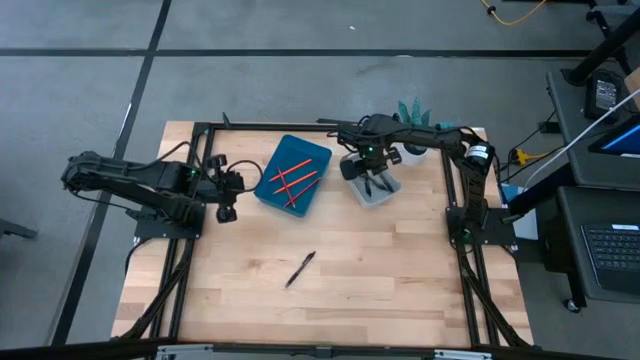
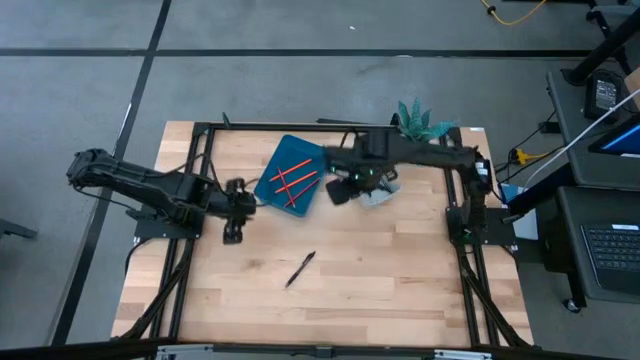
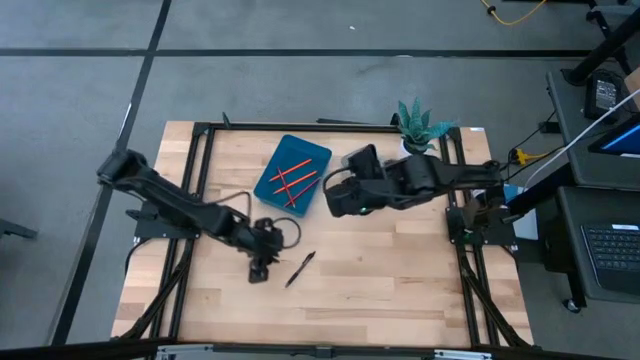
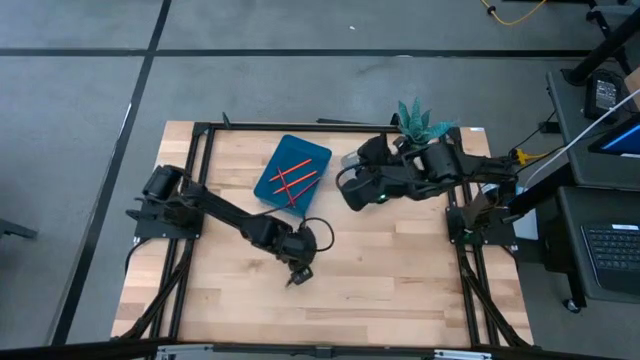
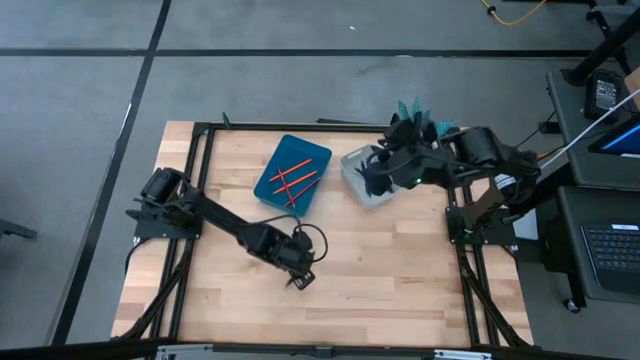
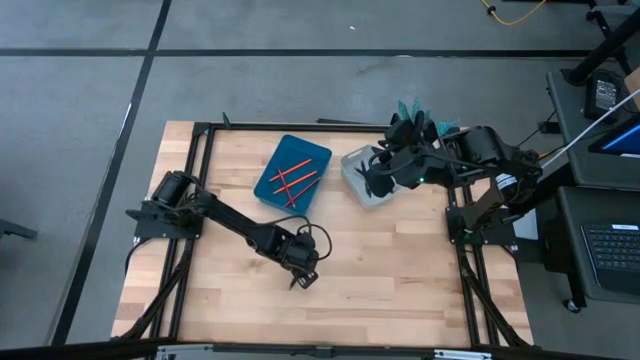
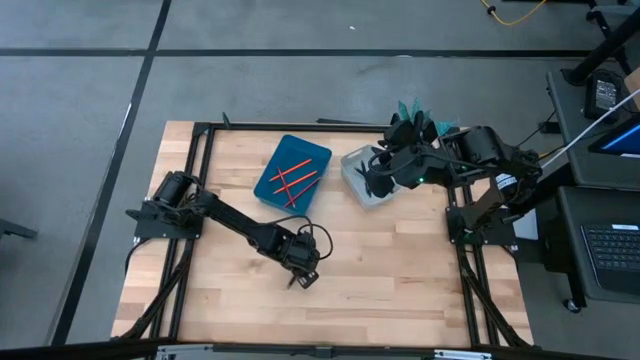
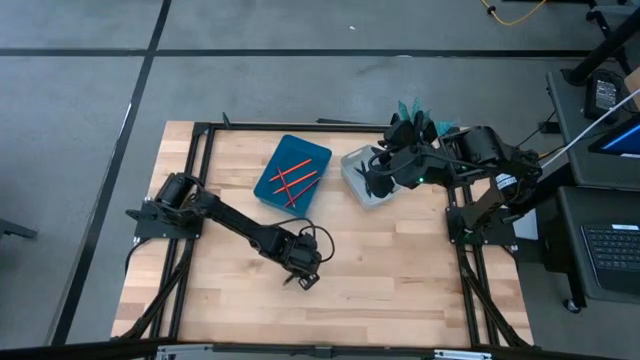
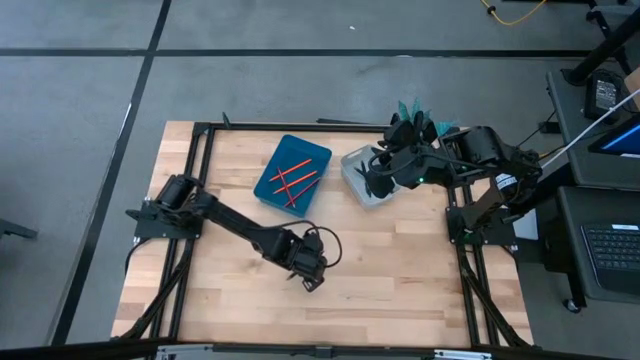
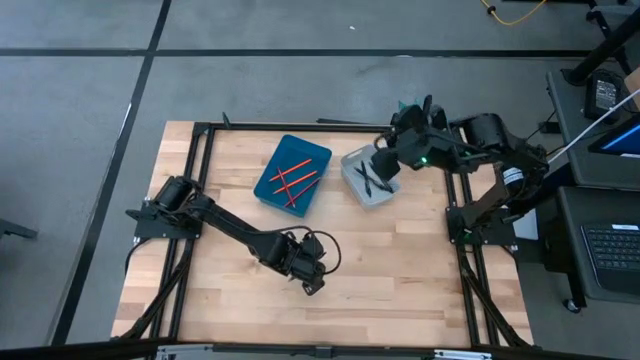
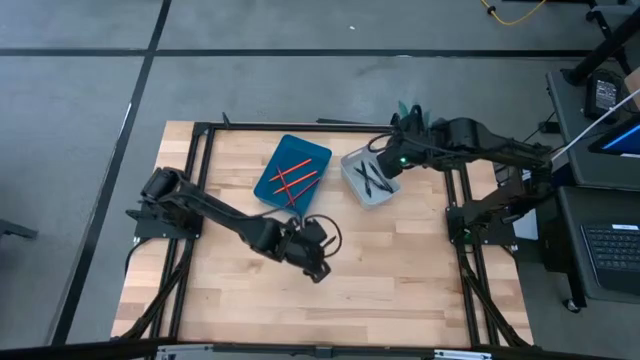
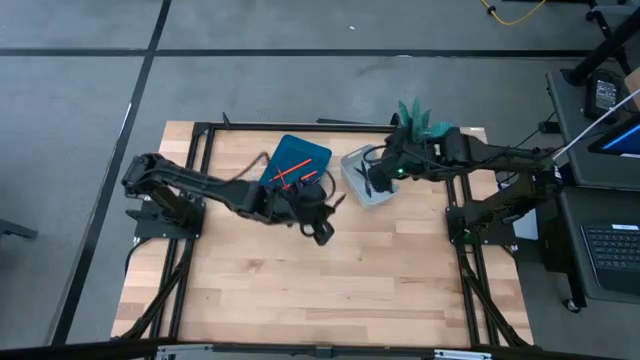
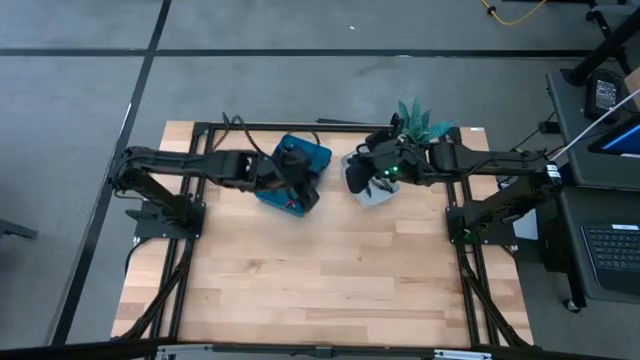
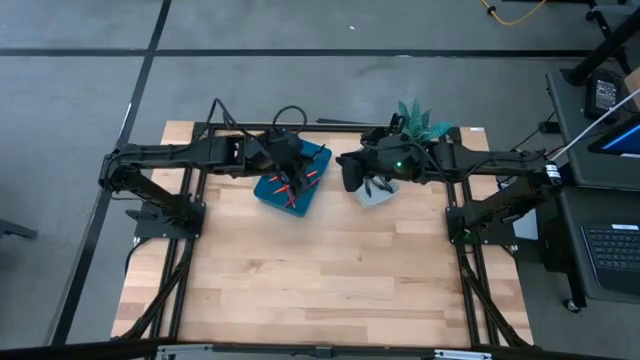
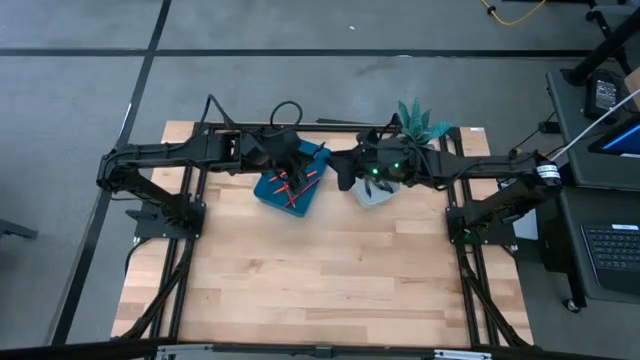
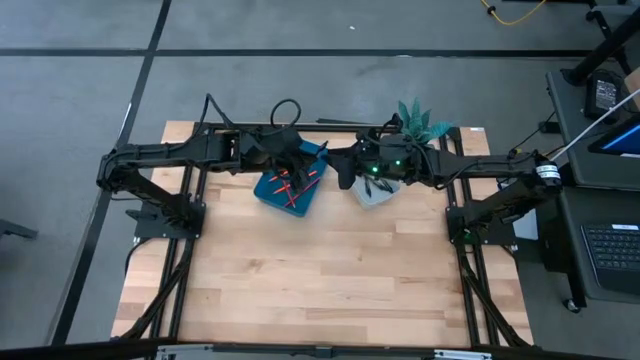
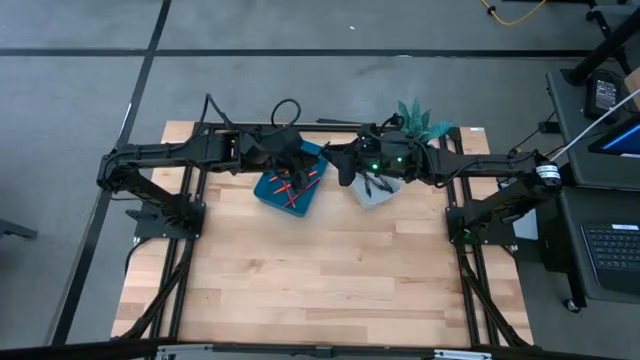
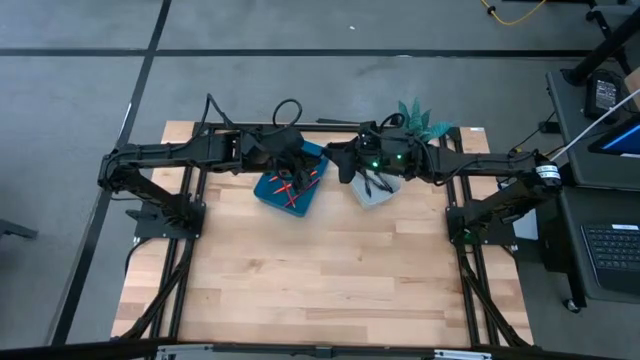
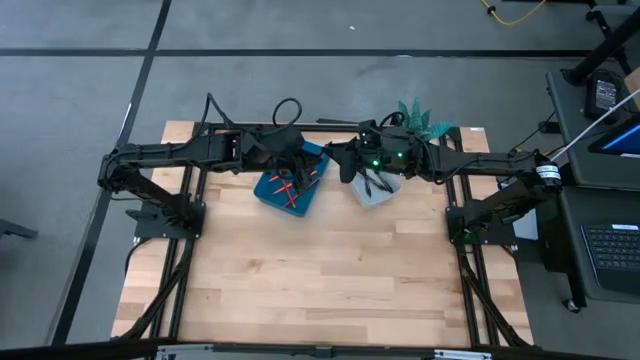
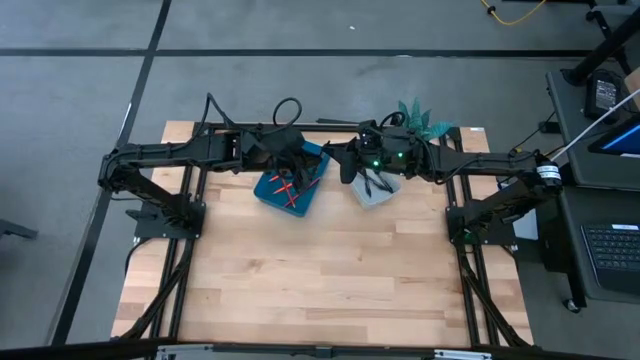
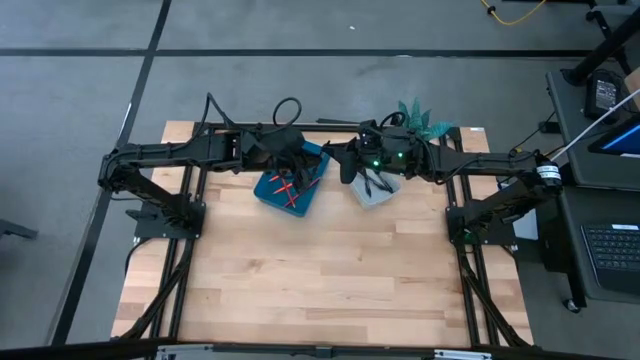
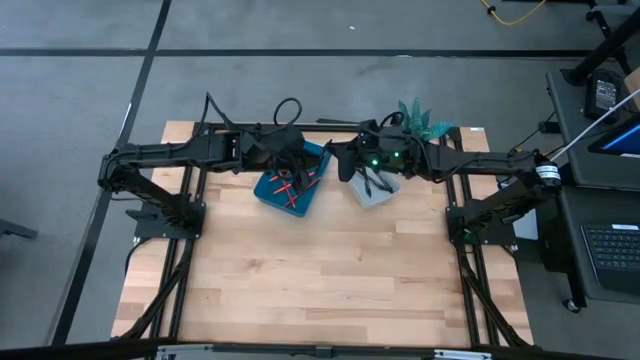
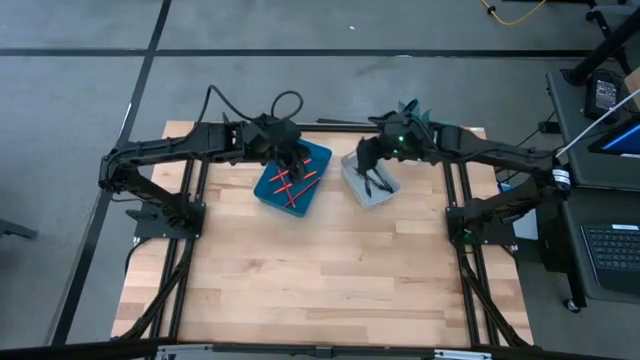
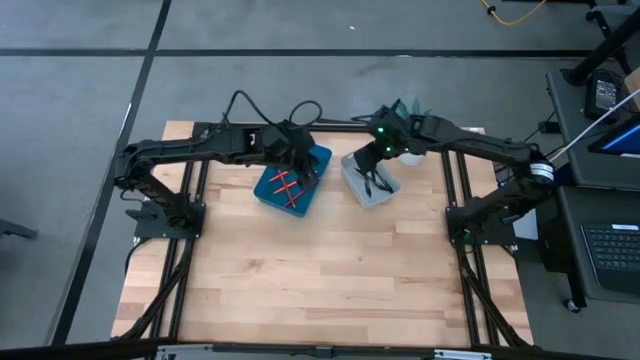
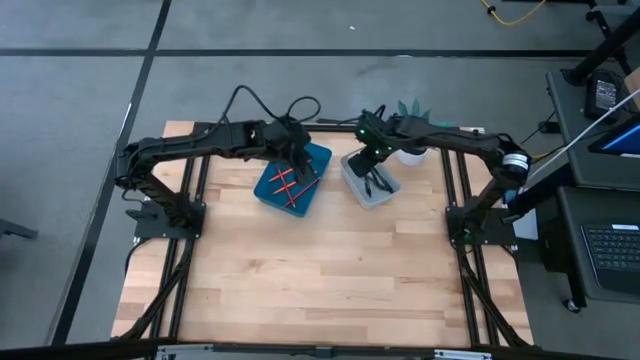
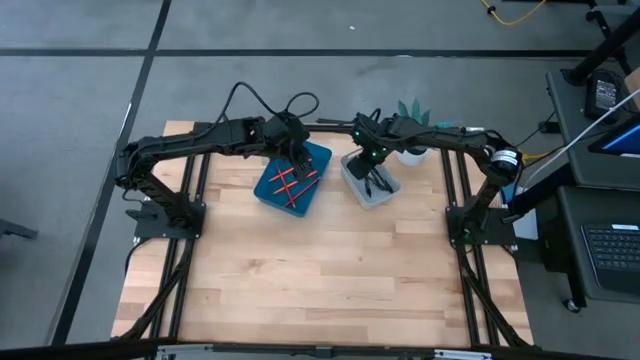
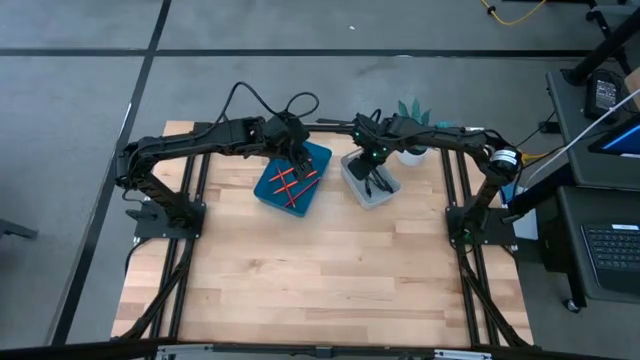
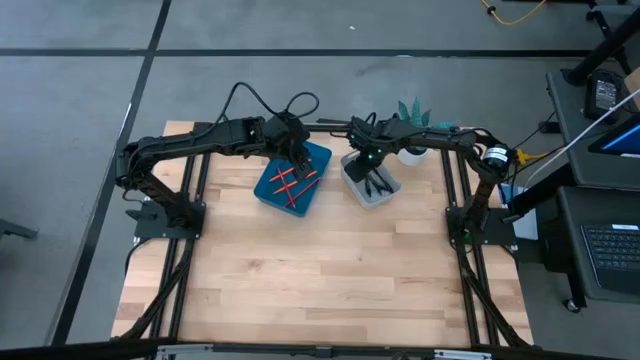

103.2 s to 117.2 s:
Task: Sort pens & pencils
Put the black pen into the gray bin

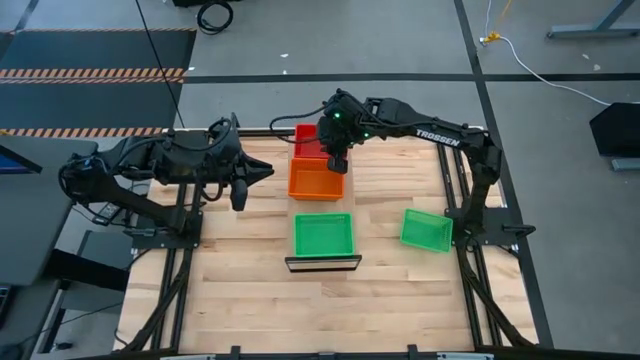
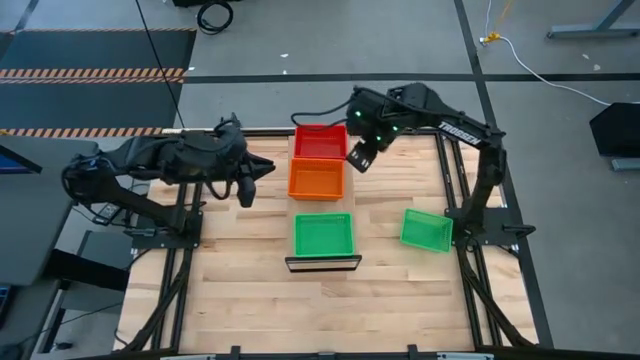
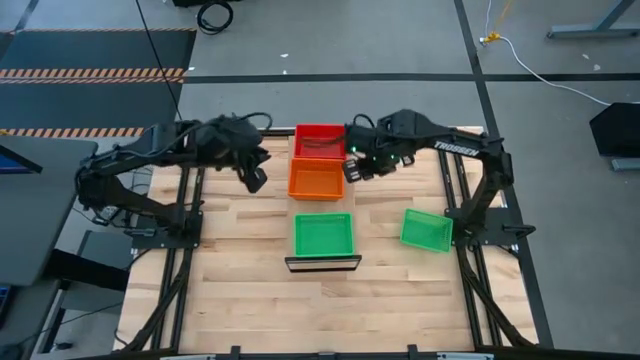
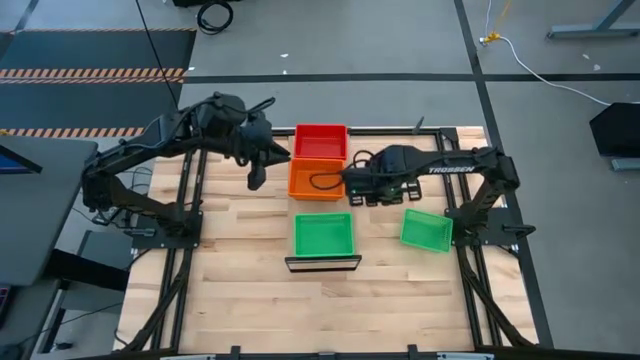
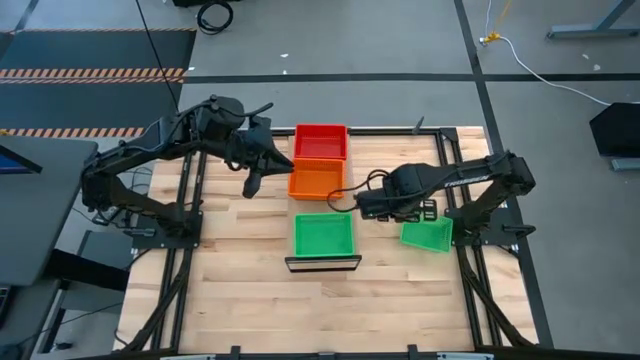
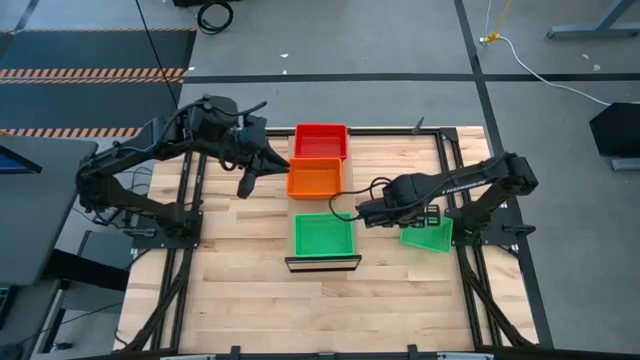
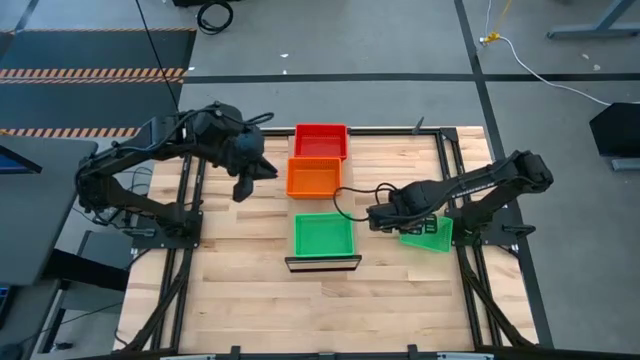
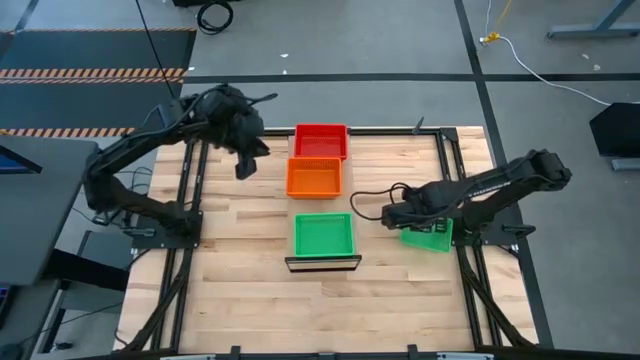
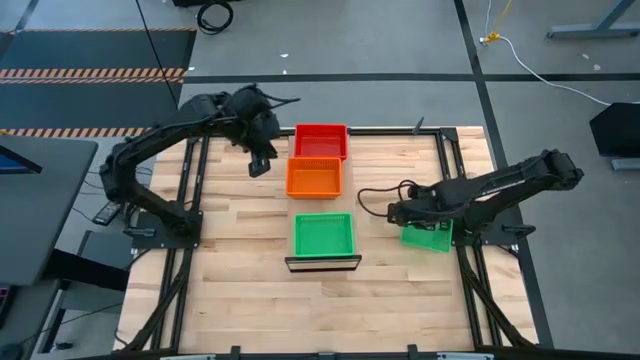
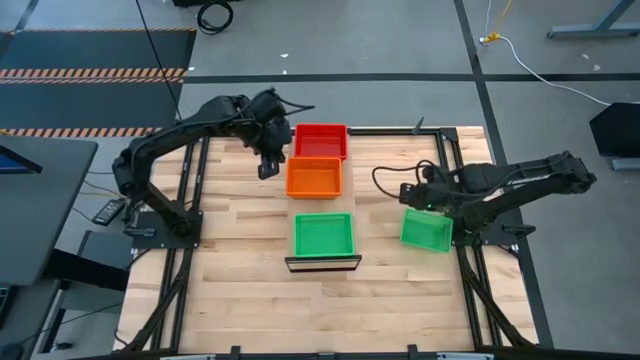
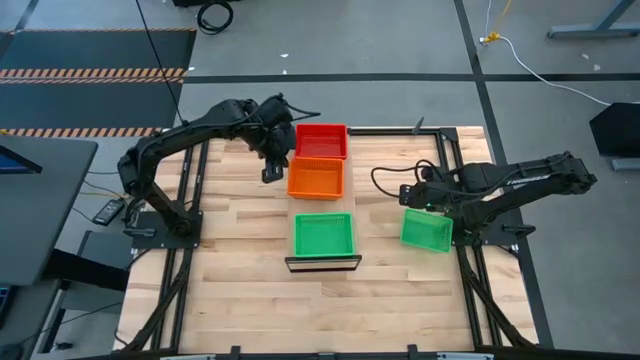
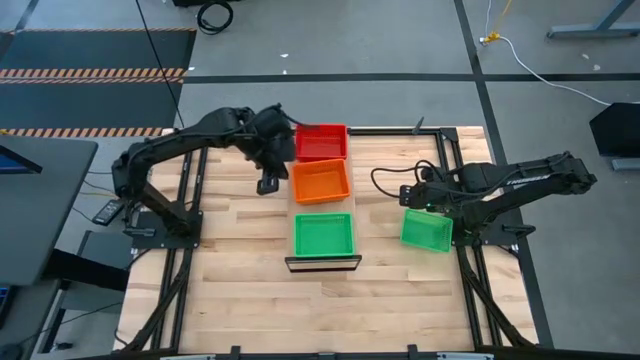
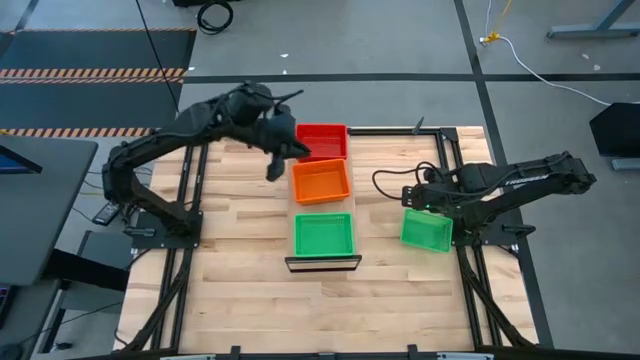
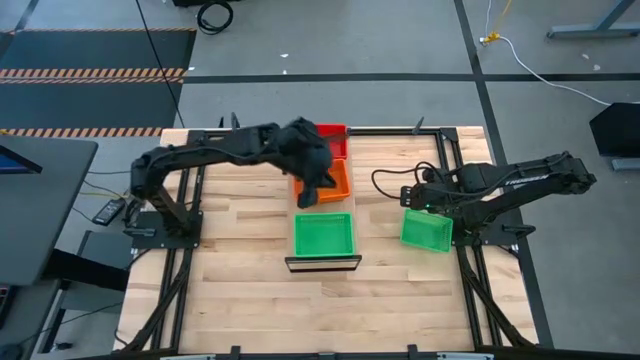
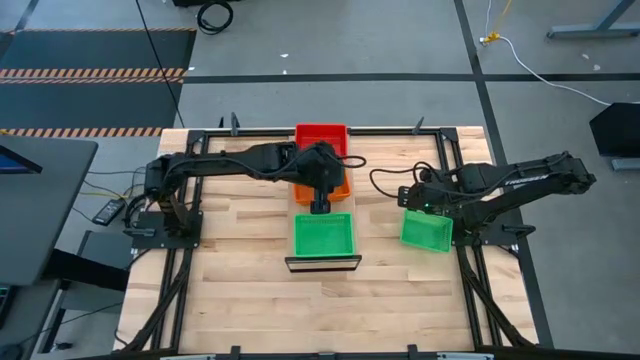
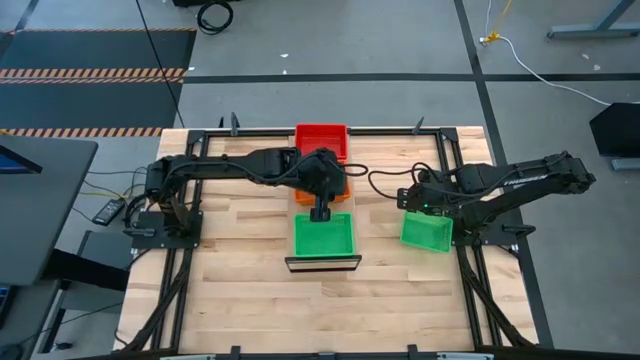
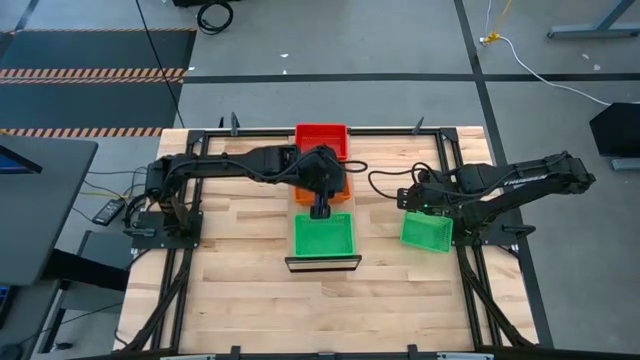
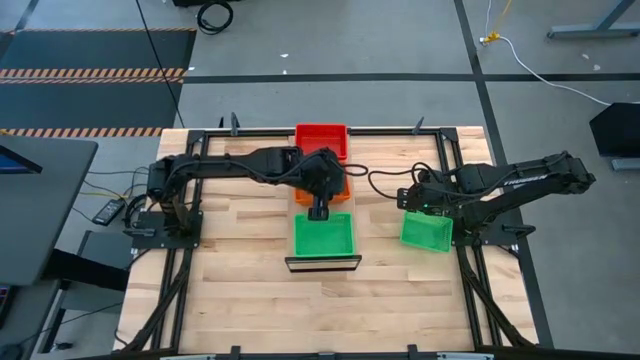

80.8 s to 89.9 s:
Task: Stack baskets on shelf by color
Adjust the orange bins on the shelf
